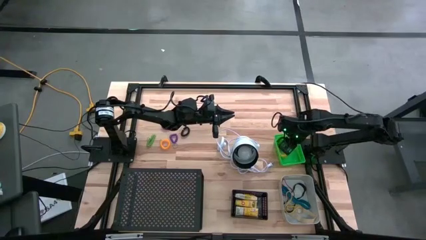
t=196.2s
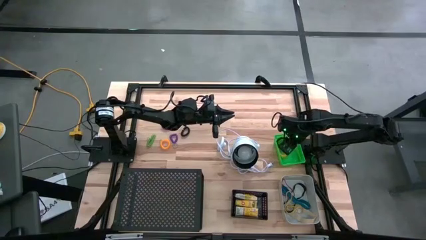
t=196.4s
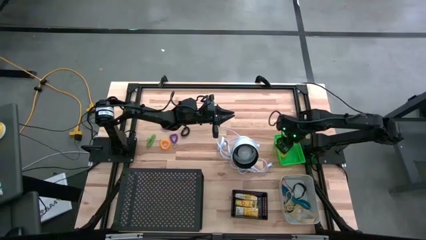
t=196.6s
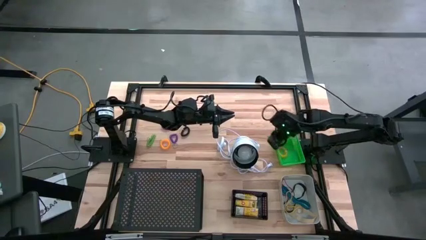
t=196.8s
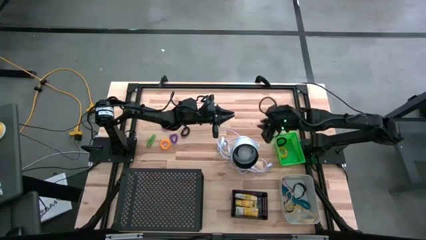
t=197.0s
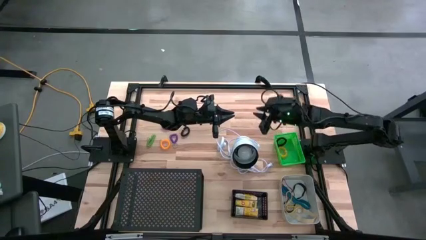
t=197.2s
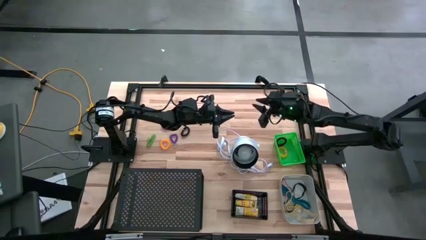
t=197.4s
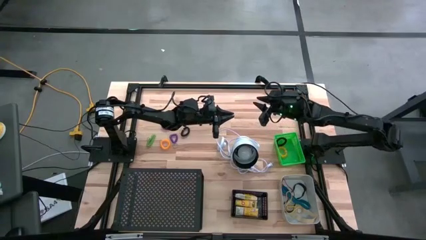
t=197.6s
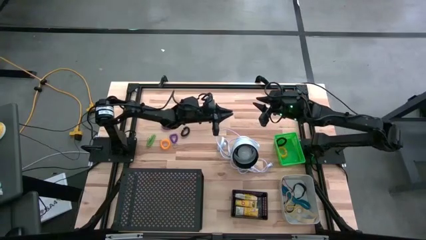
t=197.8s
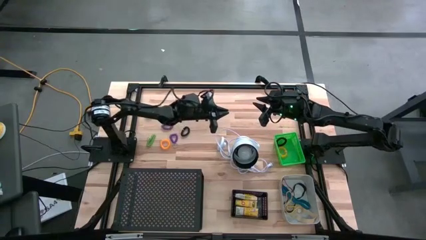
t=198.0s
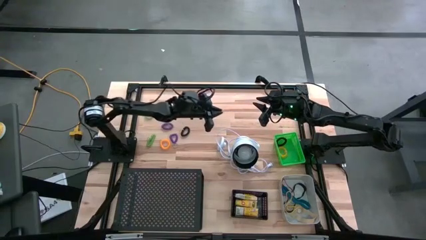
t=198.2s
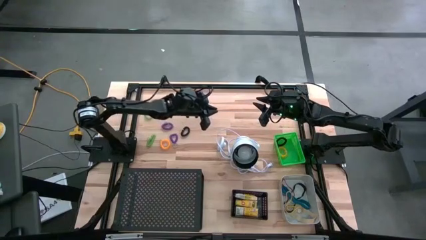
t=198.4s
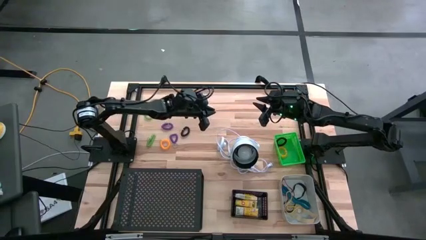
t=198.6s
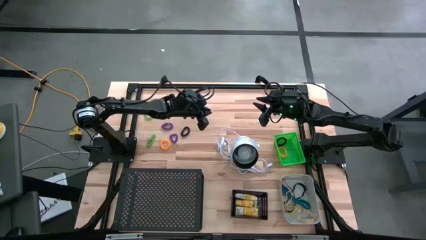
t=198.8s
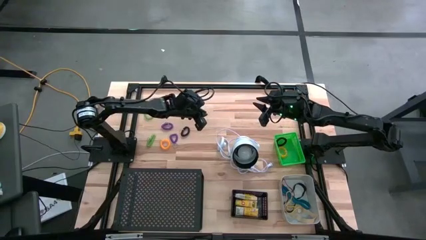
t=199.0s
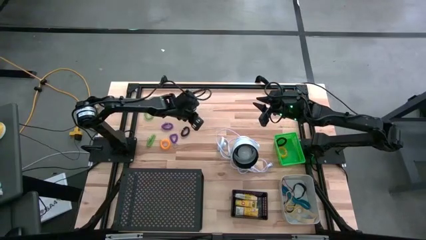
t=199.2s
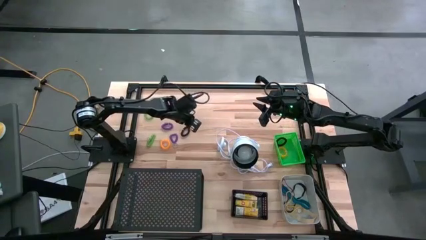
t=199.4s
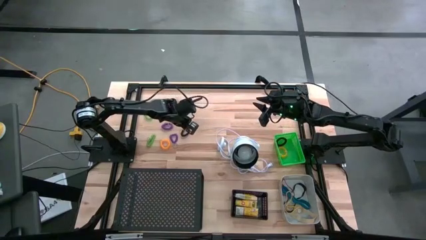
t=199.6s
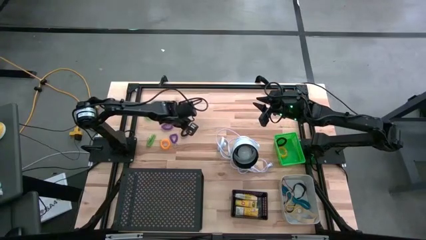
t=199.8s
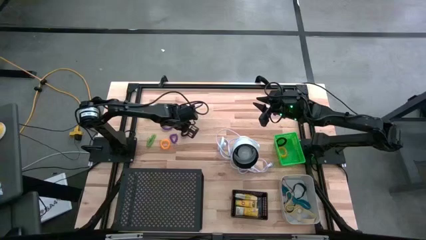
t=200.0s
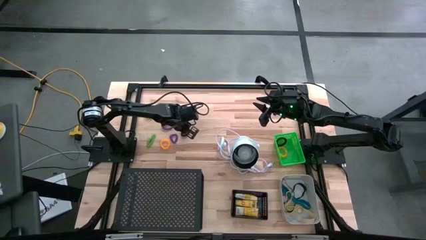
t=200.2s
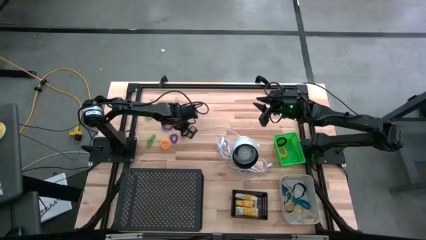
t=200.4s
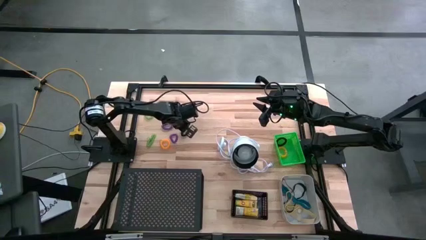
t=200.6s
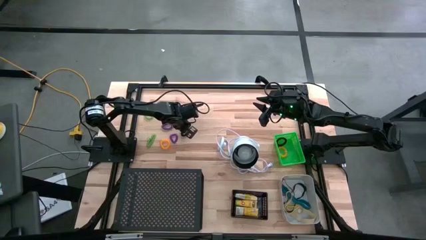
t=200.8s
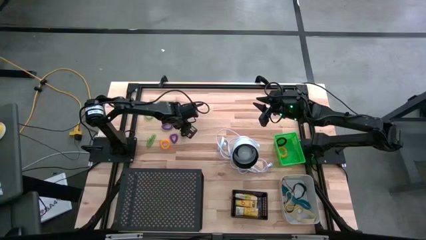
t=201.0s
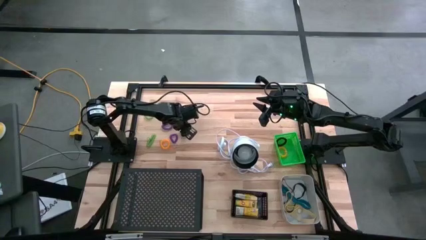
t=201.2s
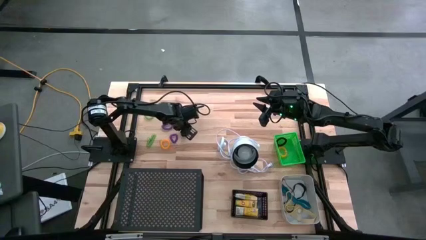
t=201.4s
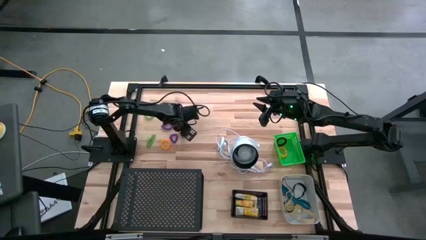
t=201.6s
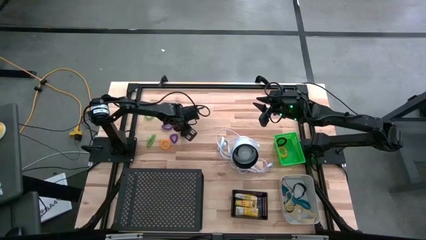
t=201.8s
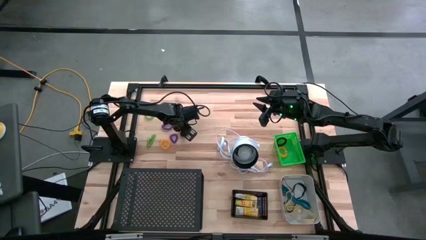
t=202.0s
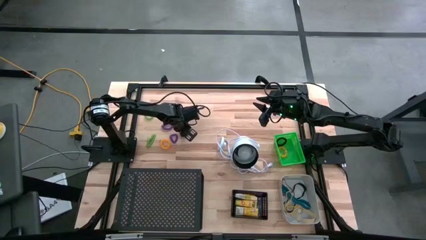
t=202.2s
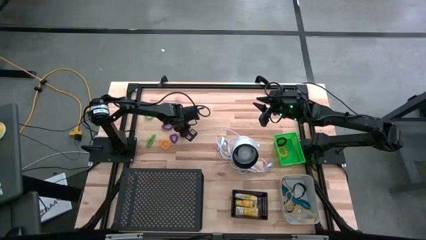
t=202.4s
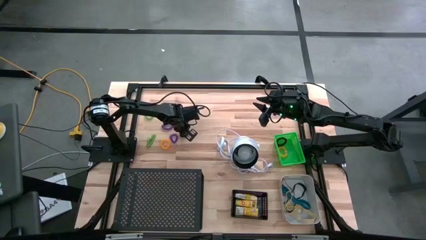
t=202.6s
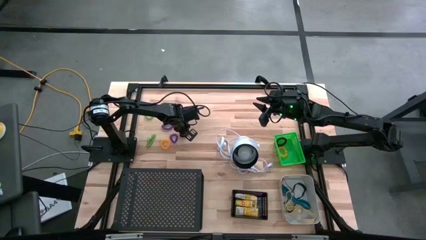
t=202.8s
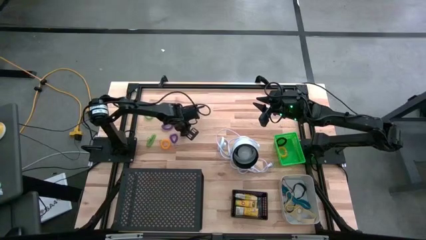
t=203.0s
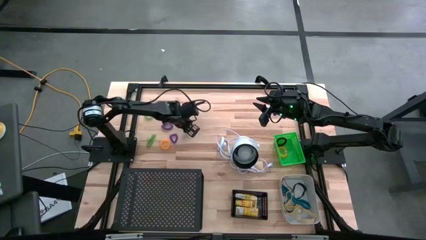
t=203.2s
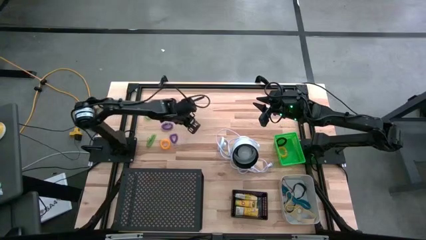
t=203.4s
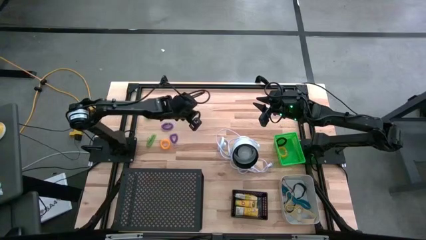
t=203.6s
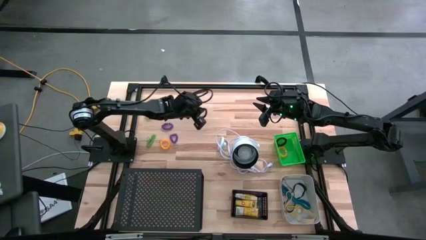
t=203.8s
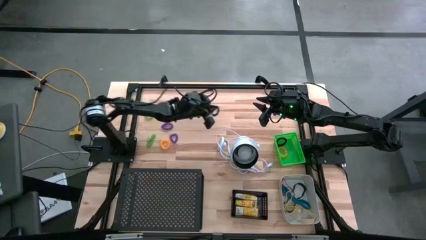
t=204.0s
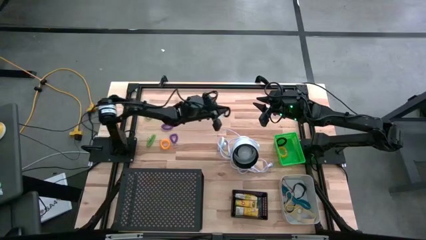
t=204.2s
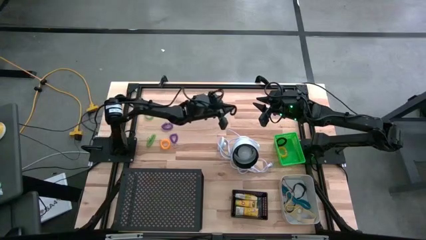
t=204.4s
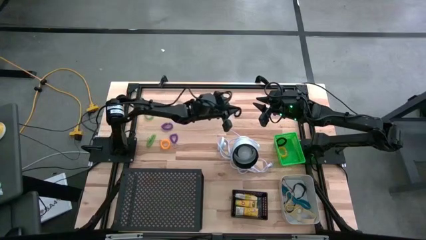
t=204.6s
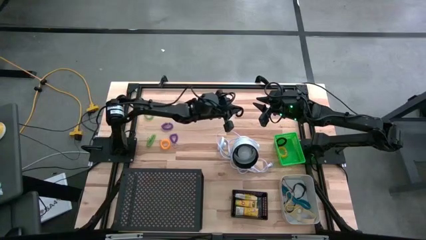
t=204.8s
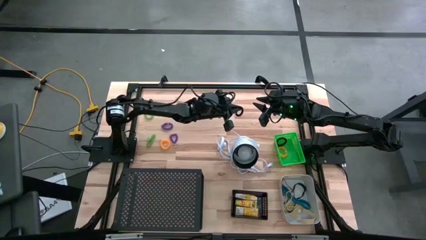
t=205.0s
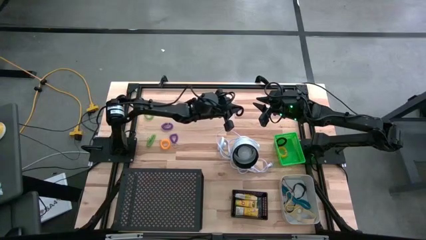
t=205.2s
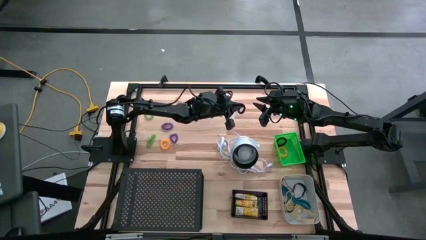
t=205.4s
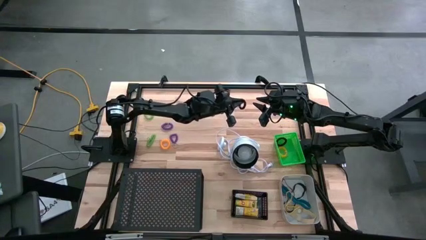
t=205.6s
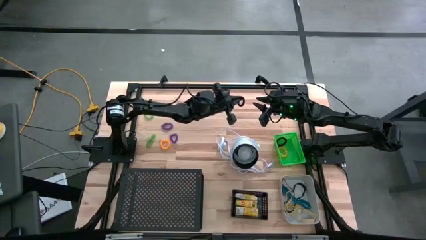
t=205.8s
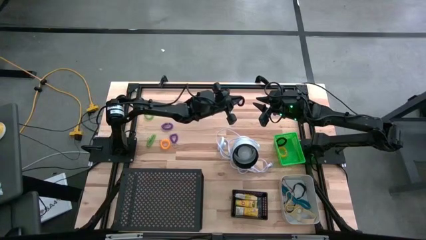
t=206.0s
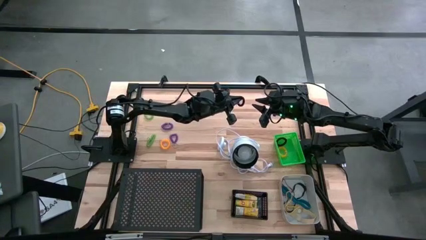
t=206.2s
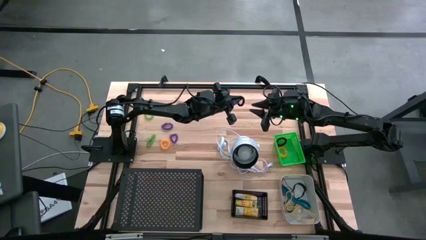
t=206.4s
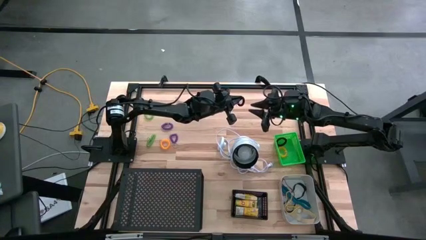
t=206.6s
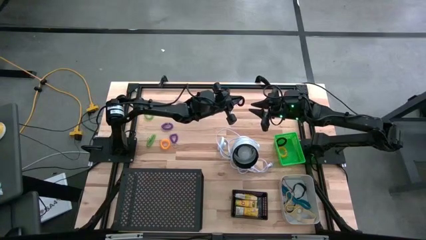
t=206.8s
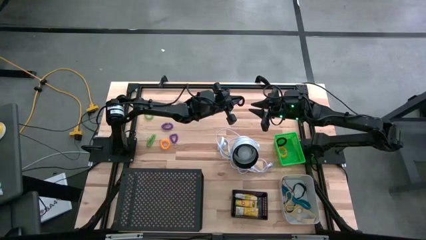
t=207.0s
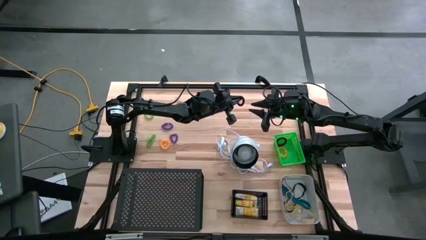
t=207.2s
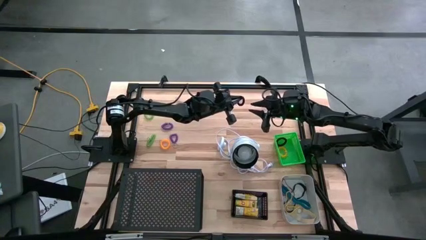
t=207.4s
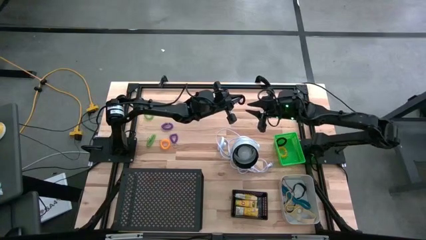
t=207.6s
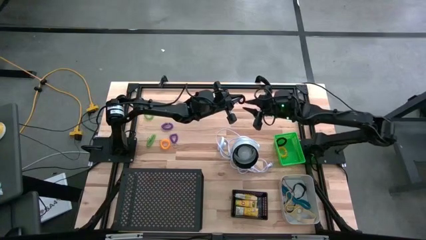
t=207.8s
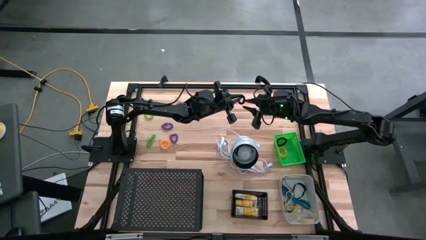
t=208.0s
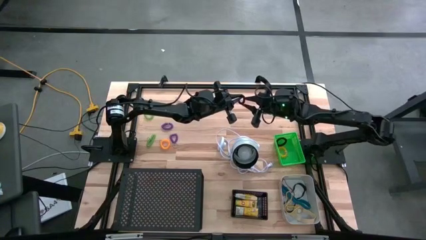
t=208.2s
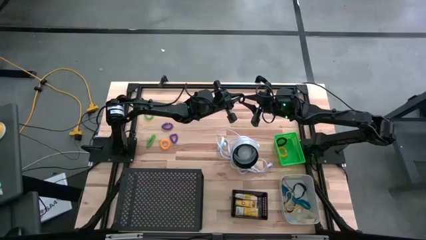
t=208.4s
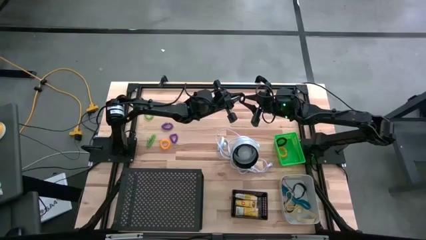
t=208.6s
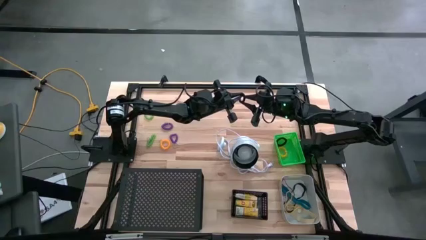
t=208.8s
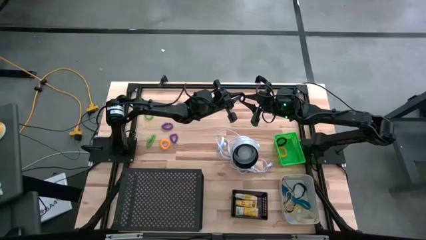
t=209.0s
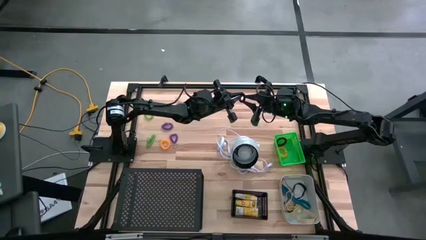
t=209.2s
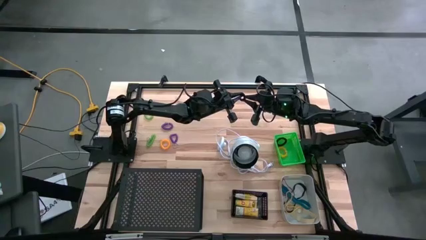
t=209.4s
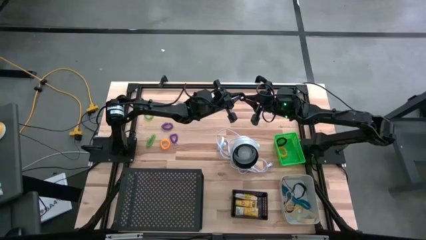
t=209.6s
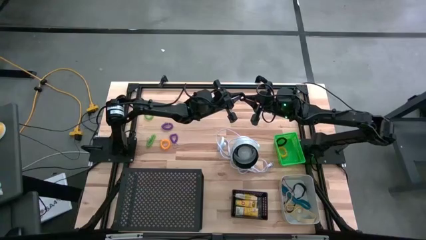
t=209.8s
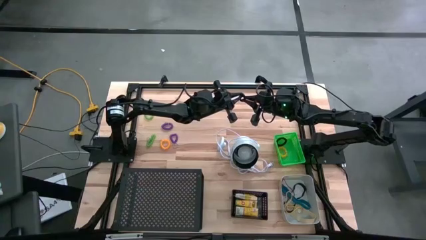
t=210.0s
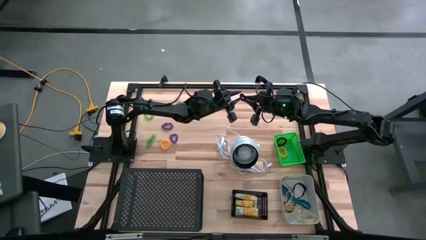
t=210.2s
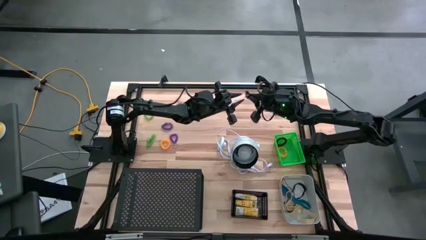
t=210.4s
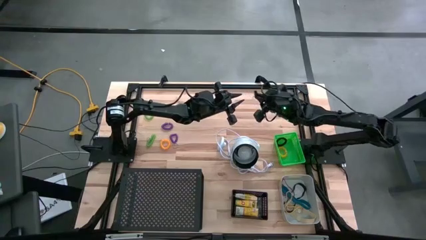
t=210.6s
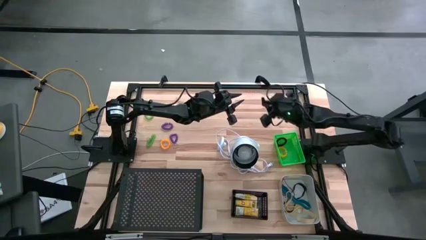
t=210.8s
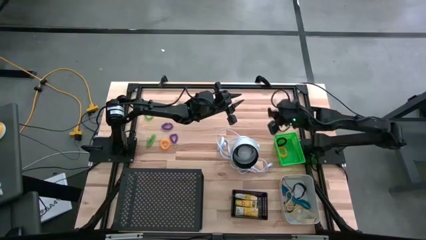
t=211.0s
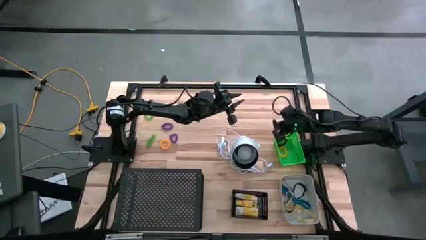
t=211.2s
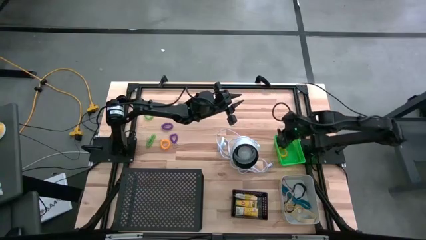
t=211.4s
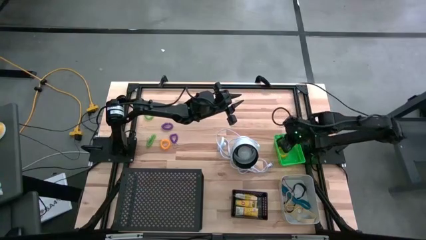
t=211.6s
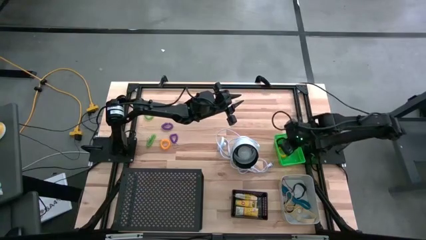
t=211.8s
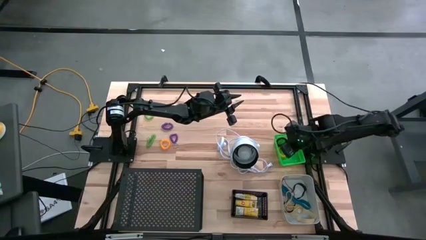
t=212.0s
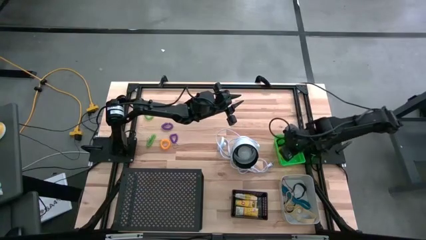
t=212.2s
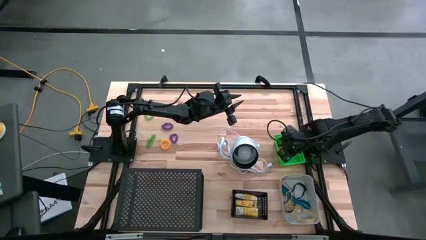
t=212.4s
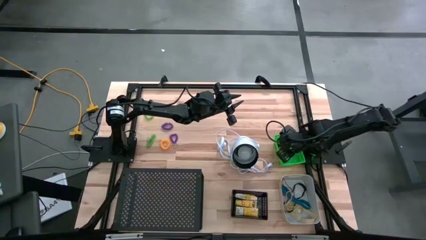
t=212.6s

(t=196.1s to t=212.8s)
Task: Pick & Place Office Desk Supplies
Put the black spring keychain into the green bin
